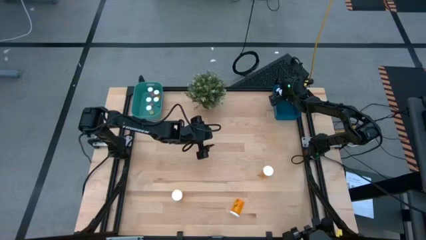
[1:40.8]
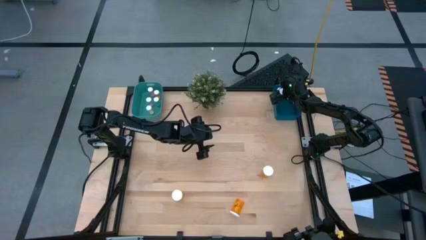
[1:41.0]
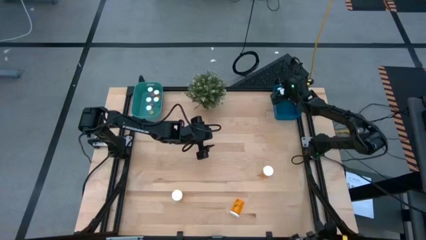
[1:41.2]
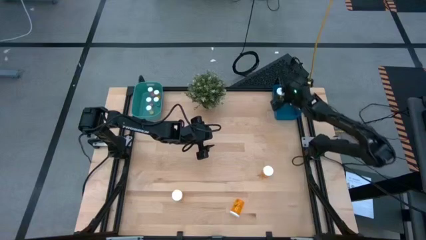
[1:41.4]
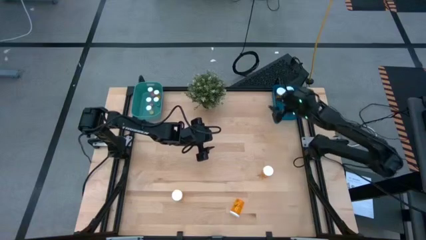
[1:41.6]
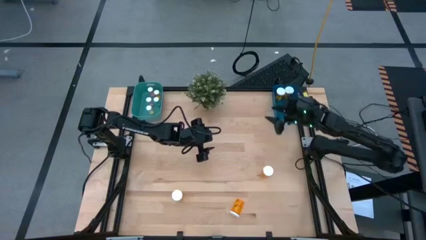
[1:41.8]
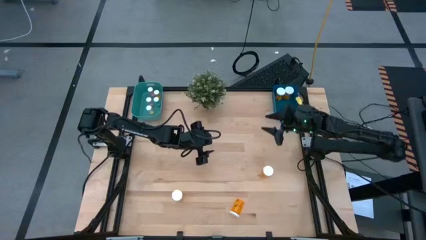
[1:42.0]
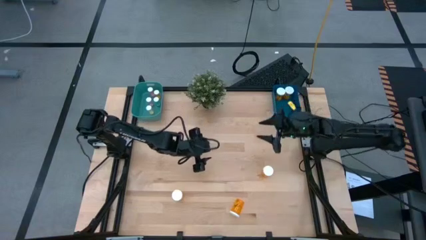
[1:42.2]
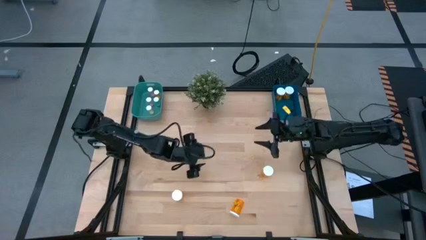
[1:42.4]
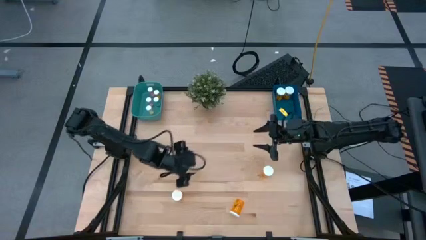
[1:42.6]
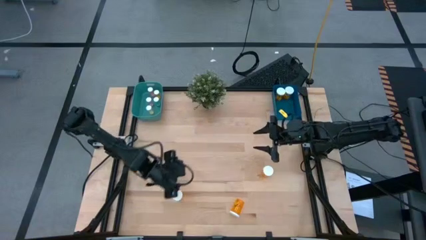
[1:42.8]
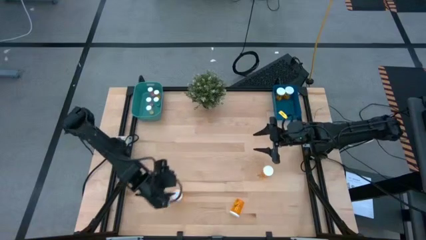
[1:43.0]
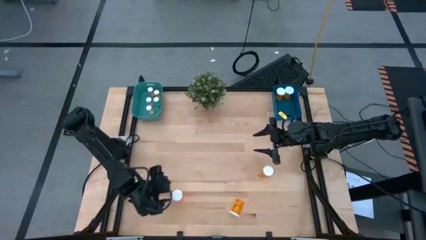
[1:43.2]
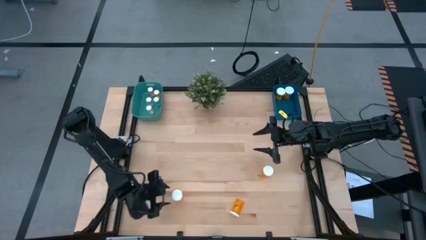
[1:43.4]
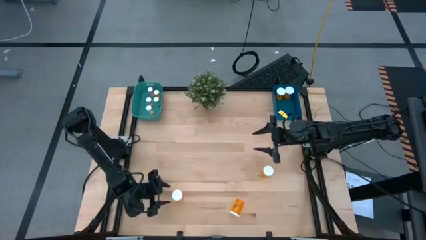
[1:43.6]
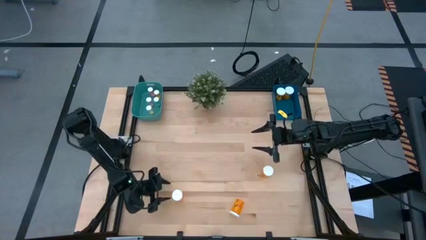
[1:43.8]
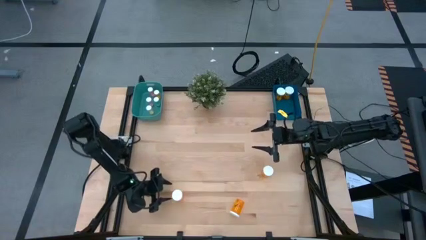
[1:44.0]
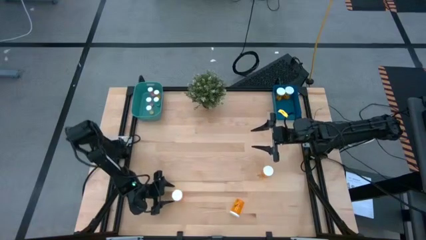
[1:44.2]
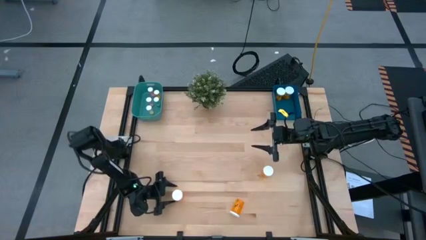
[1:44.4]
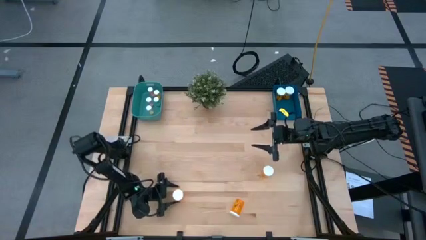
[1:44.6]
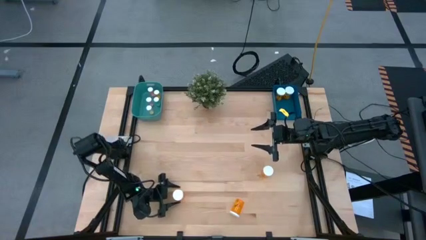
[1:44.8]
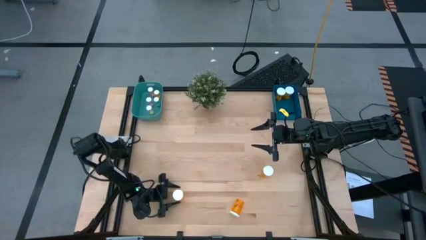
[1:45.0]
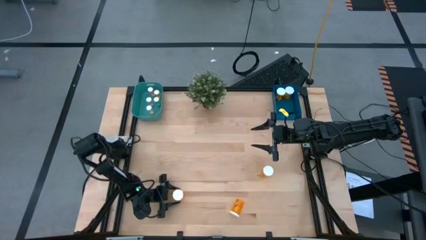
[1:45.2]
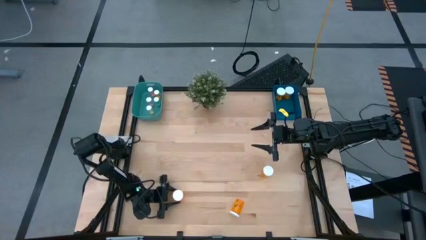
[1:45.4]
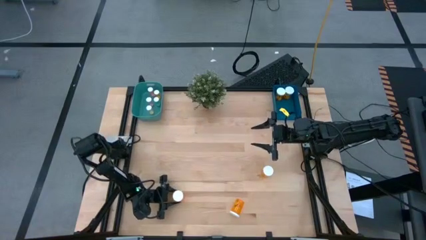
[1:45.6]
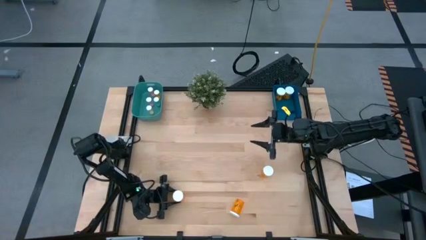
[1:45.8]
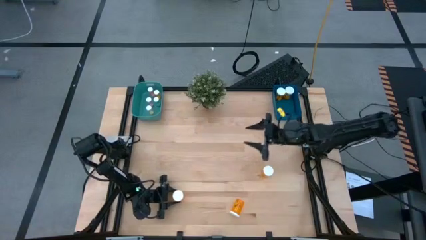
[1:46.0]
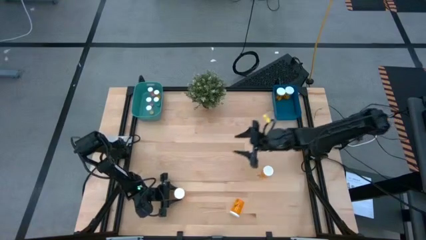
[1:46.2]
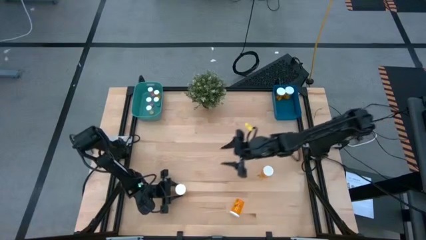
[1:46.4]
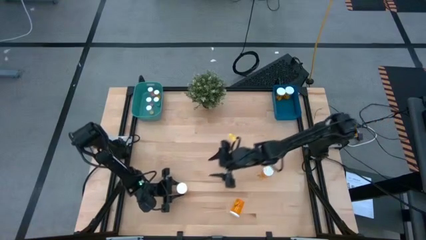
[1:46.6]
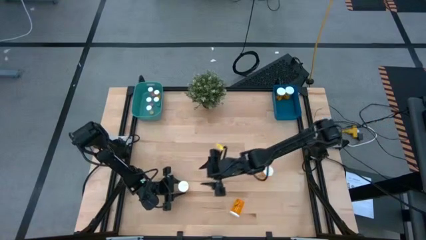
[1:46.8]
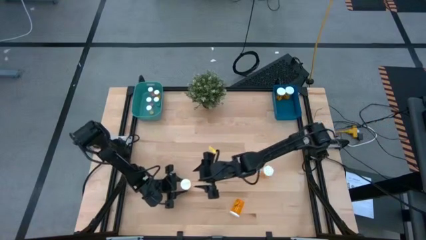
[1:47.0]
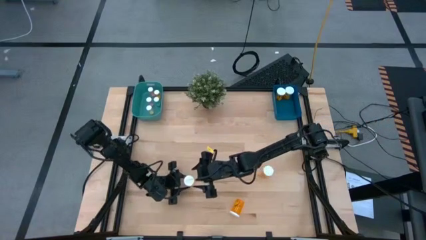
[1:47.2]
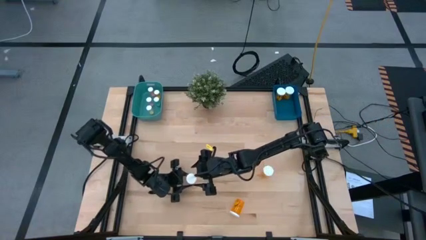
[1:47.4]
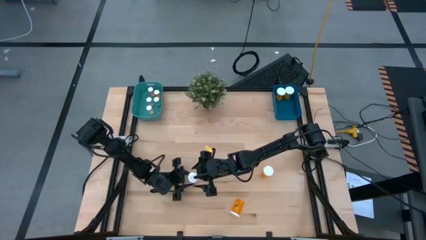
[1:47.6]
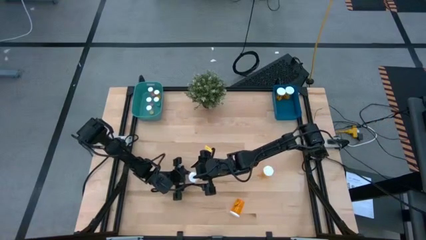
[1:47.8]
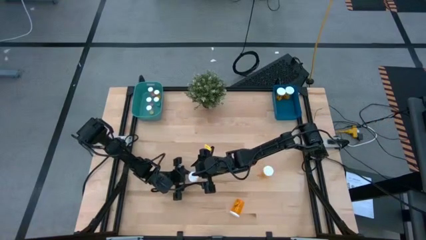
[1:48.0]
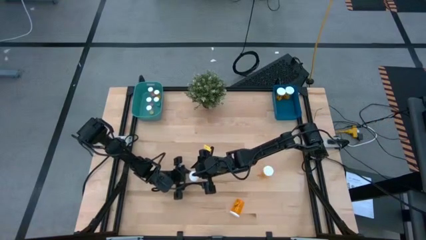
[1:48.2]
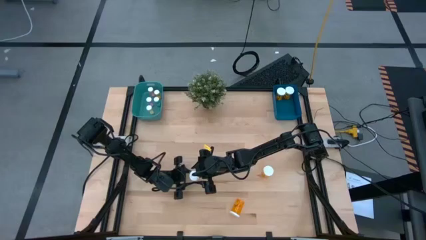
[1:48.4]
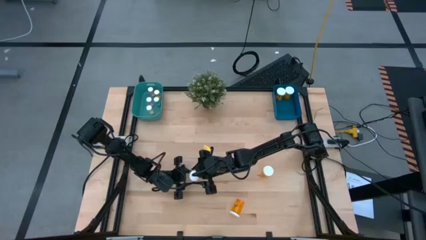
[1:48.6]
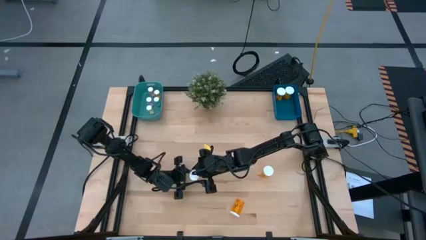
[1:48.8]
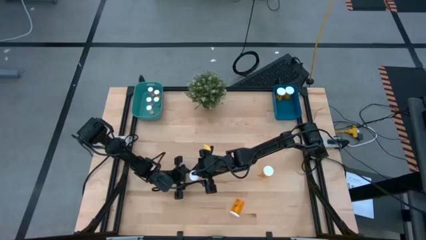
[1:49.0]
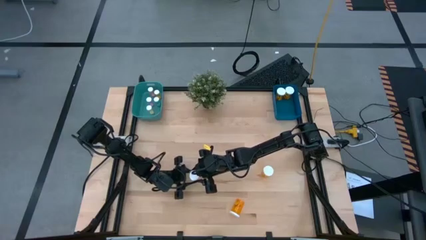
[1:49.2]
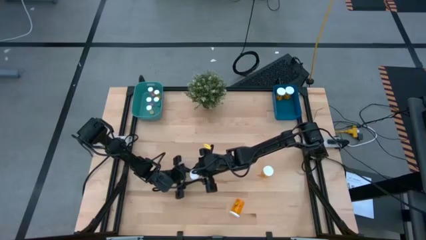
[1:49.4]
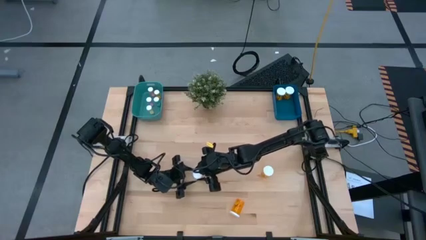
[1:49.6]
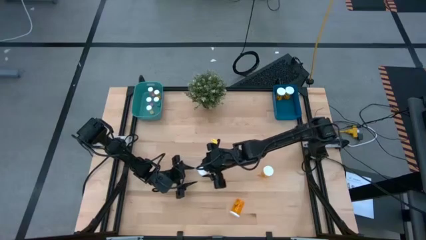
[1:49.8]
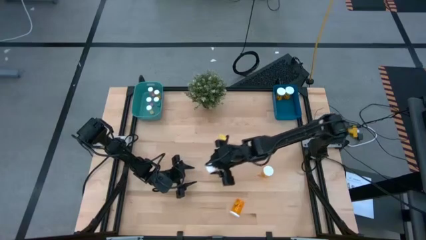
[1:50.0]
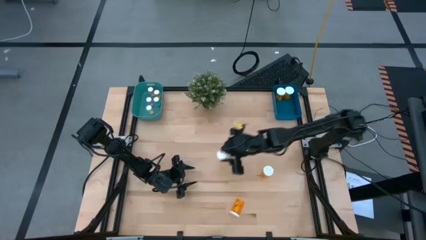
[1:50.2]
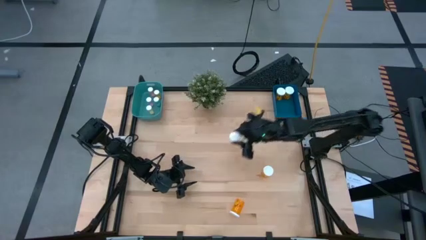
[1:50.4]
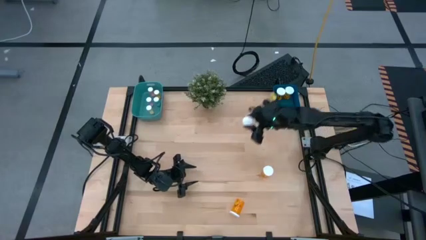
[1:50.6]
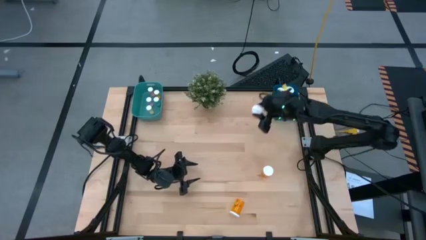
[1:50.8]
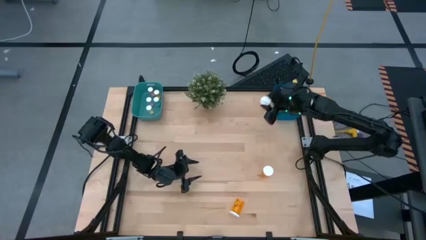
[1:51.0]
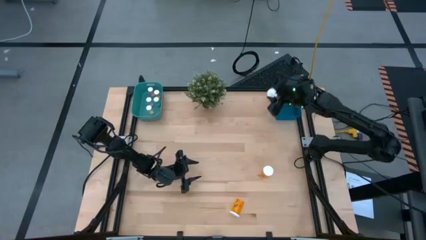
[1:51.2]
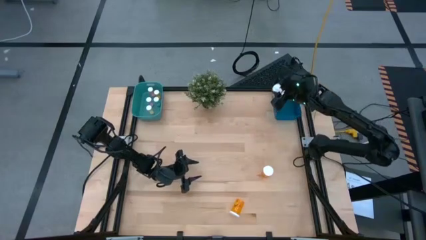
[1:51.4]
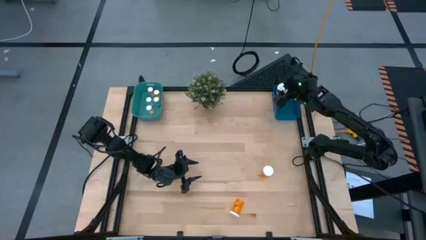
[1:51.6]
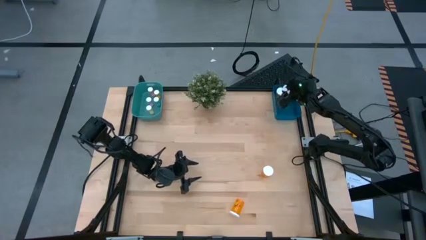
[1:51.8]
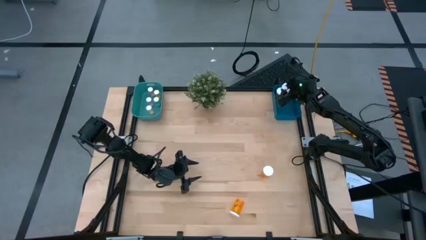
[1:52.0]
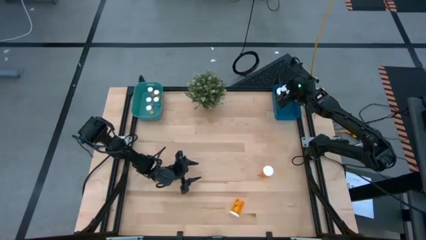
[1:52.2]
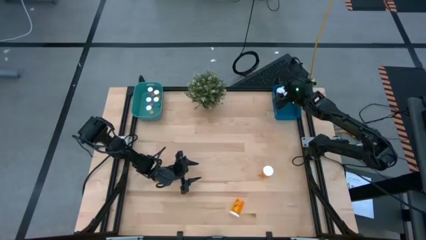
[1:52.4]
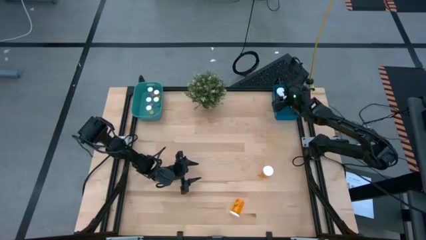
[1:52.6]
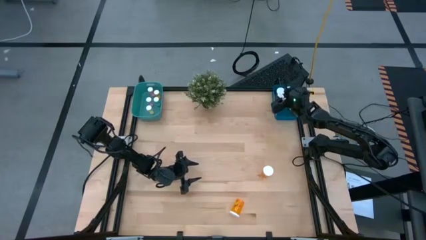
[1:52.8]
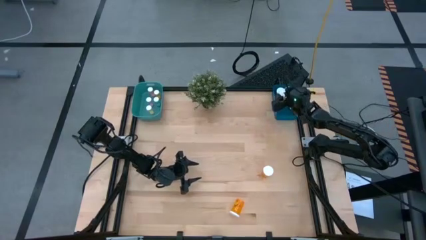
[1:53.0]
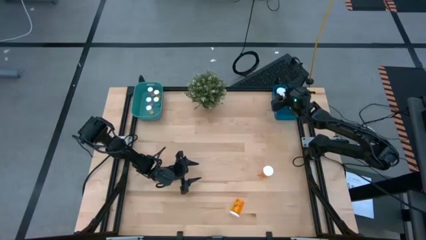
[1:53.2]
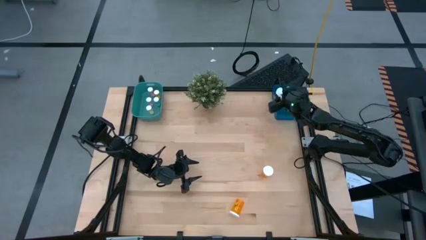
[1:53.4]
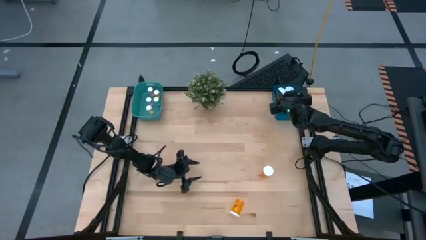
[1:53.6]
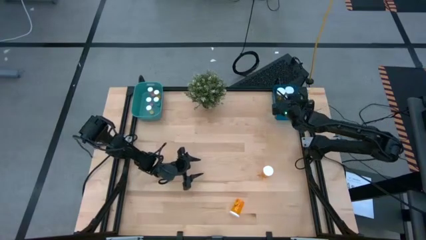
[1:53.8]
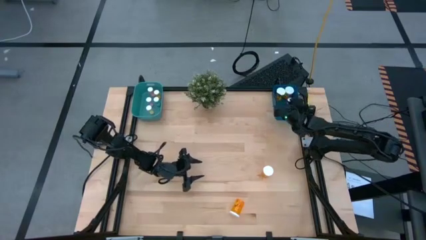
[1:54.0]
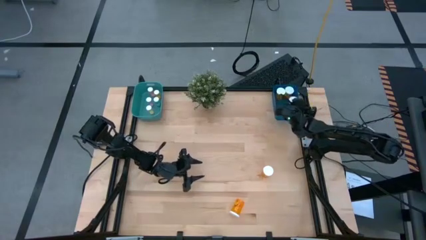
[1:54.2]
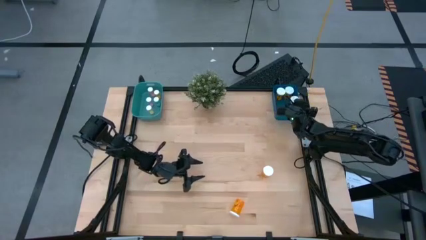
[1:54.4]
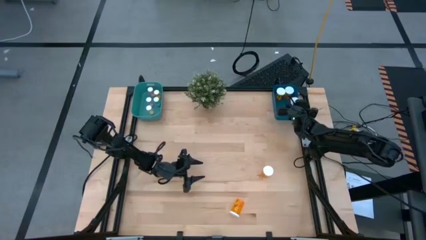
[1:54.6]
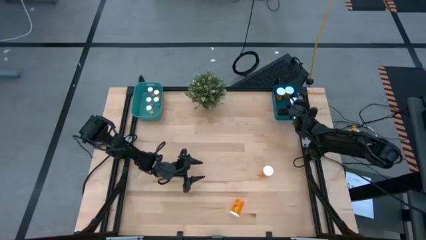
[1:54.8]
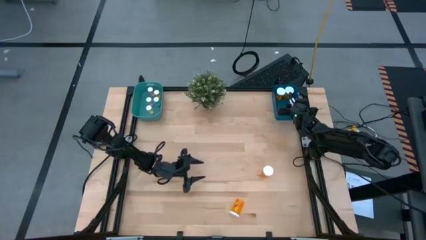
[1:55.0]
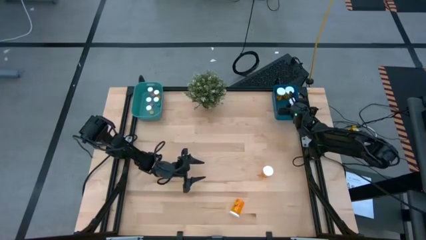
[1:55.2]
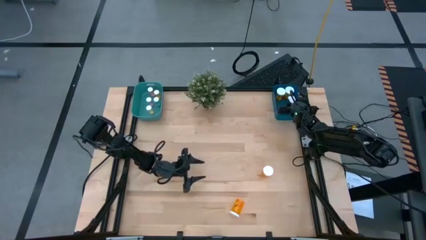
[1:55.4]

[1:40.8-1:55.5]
Task: Pick and place medicine bottles into bin by pill shape (circle, oval)
Put the big orange pill bottle into the blue bin
